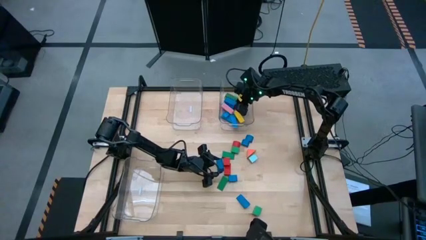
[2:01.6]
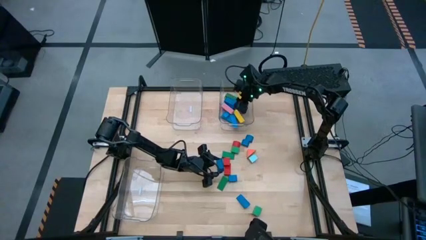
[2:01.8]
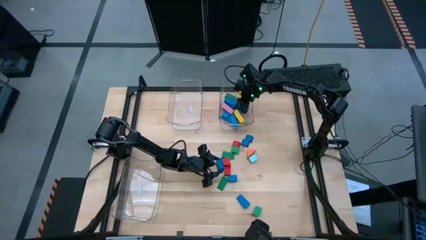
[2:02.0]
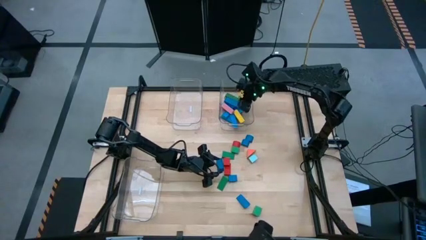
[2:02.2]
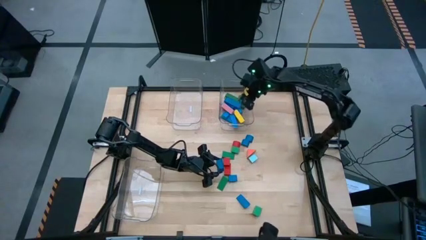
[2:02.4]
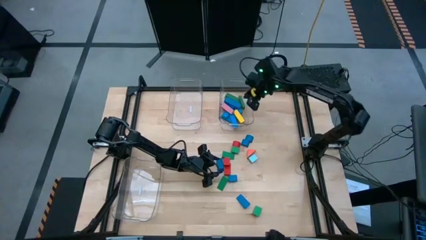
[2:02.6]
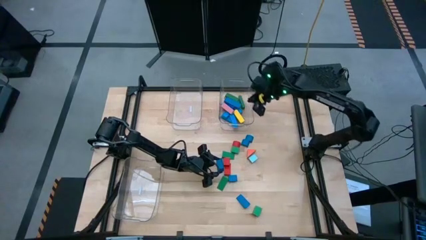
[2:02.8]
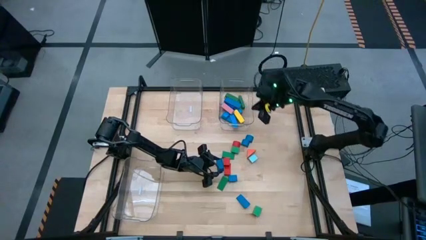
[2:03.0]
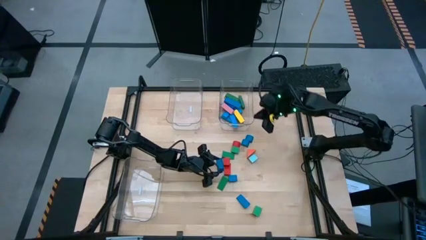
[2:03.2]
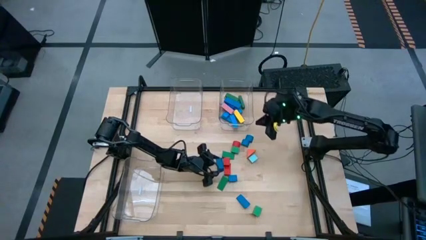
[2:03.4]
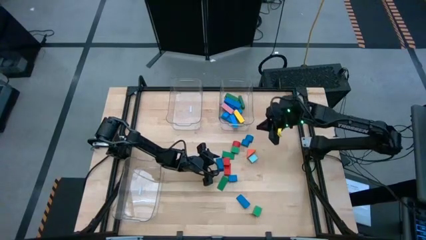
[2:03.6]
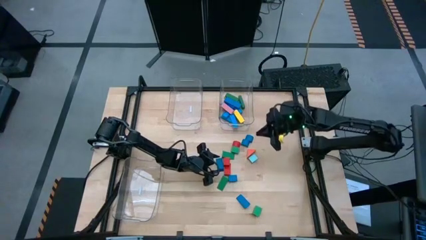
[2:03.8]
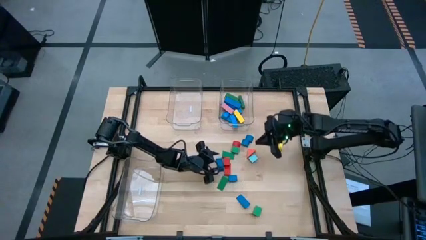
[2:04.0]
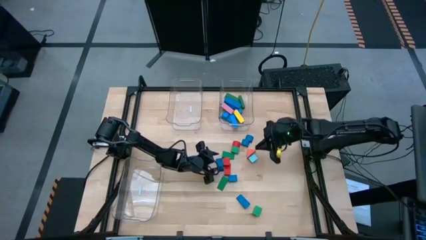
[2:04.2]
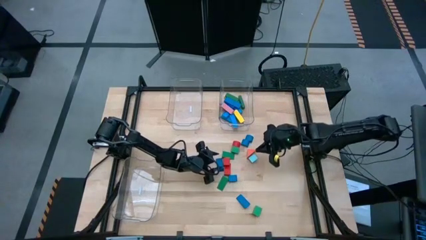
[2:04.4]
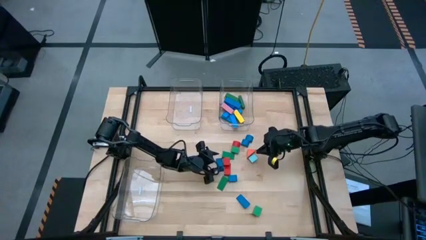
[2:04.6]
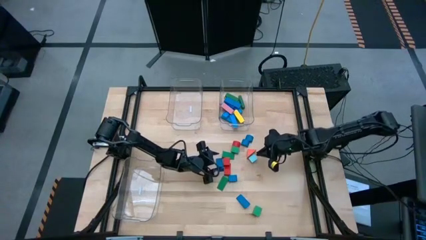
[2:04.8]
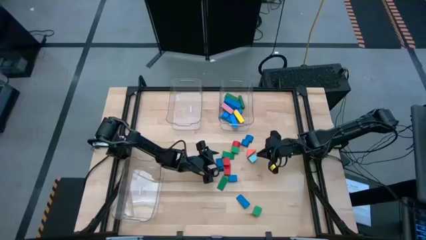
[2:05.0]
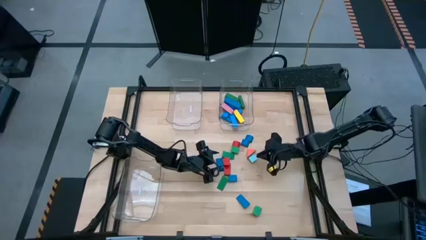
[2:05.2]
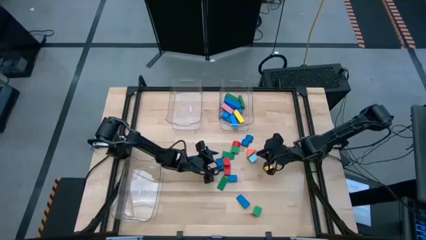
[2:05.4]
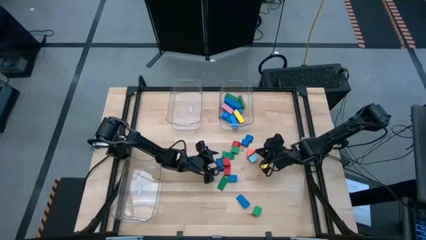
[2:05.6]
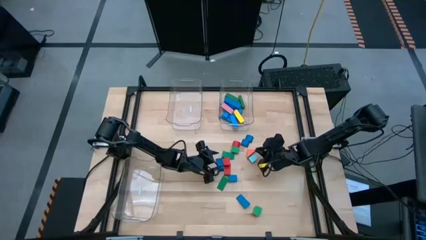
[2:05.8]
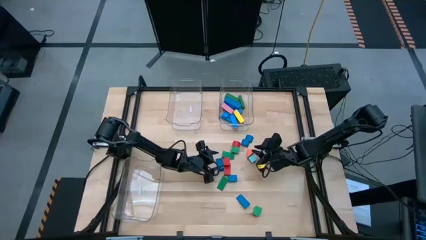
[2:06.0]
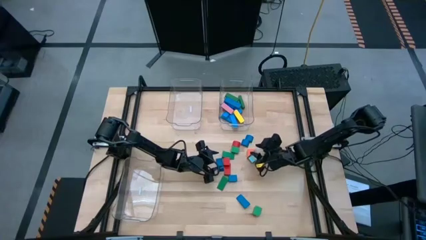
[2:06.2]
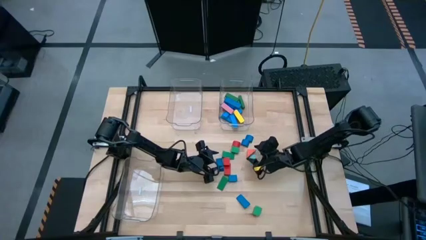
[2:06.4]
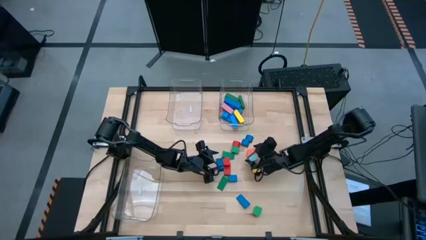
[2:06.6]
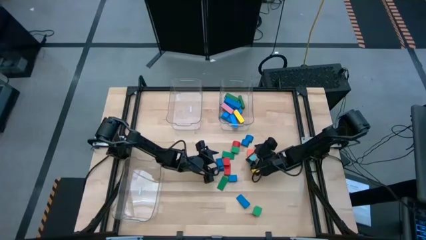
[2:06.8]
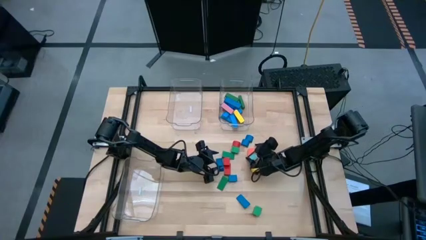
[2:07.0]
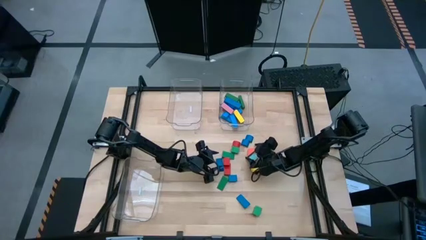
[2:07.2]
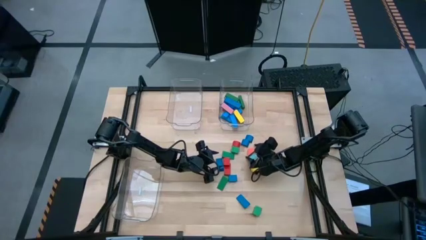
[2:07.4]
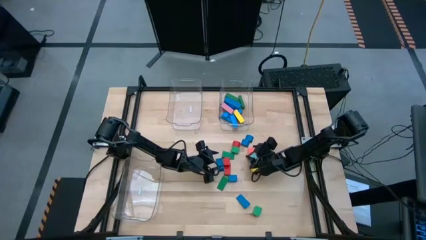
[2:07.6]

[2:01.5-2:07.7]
Task: Sort blocks by size
Put the orange triangular block into the bottom transparent bin

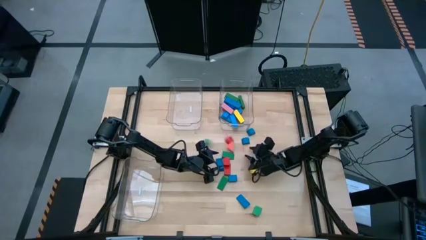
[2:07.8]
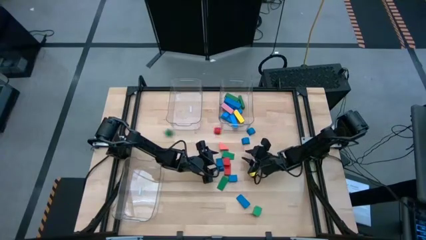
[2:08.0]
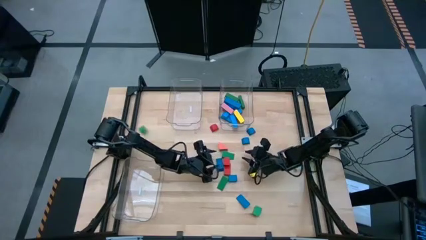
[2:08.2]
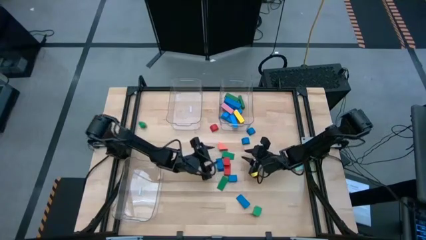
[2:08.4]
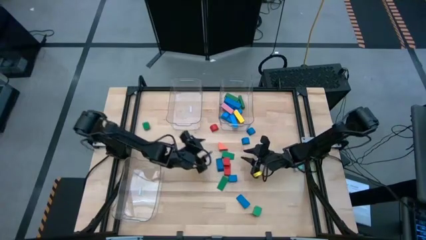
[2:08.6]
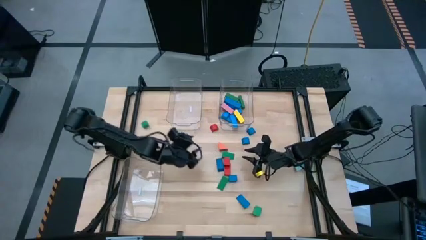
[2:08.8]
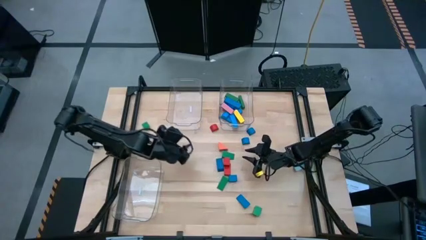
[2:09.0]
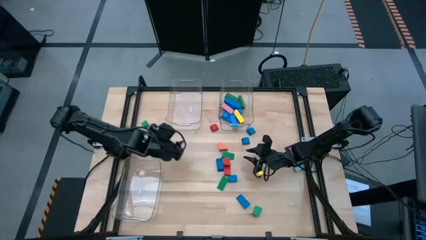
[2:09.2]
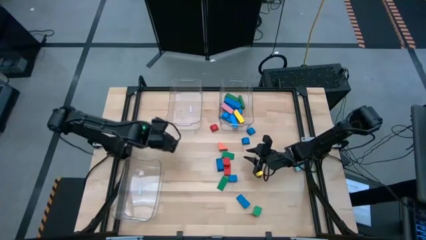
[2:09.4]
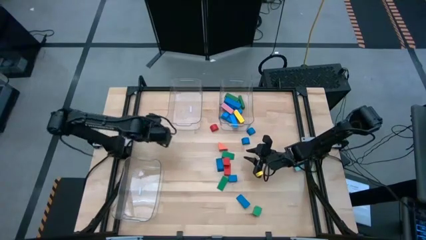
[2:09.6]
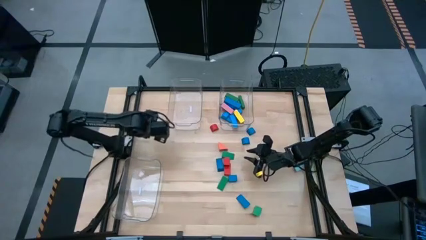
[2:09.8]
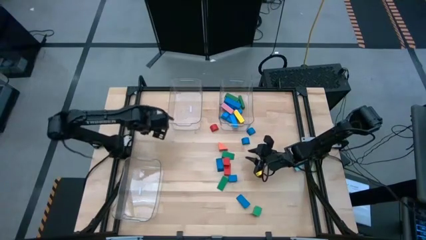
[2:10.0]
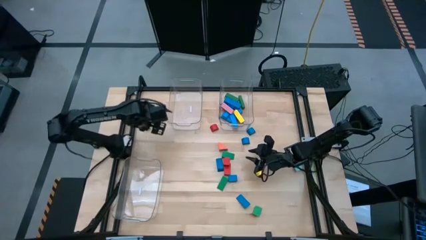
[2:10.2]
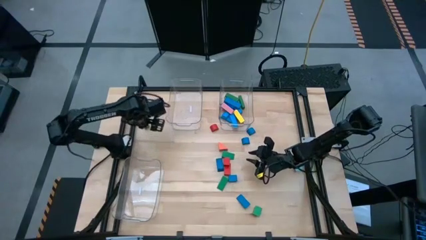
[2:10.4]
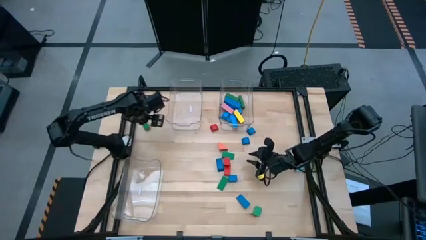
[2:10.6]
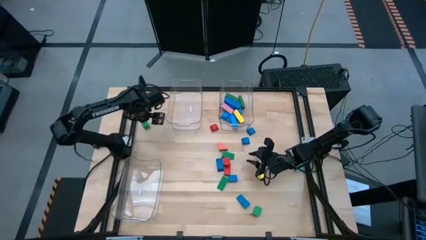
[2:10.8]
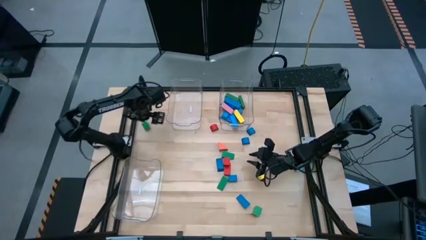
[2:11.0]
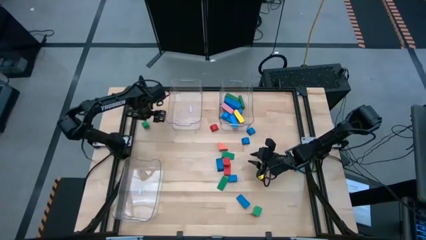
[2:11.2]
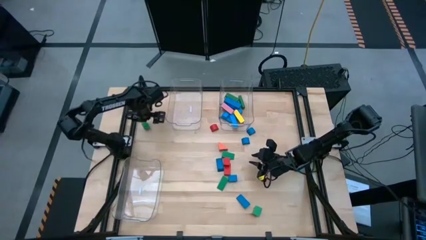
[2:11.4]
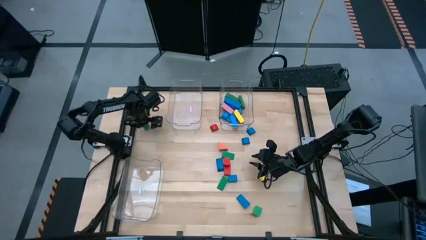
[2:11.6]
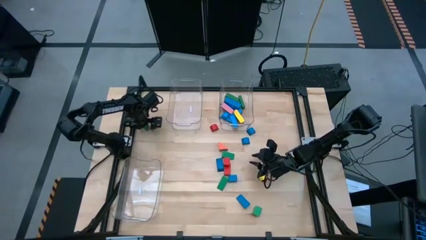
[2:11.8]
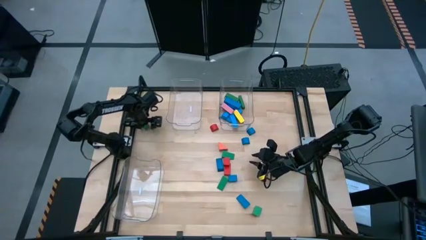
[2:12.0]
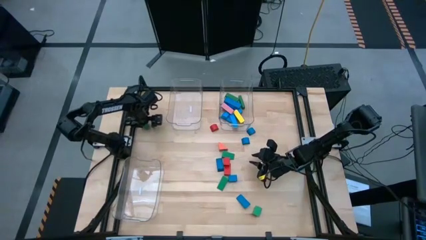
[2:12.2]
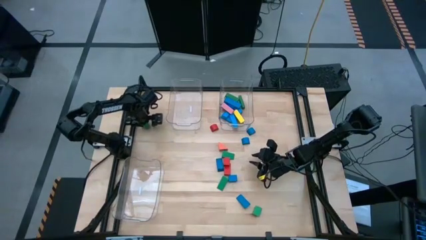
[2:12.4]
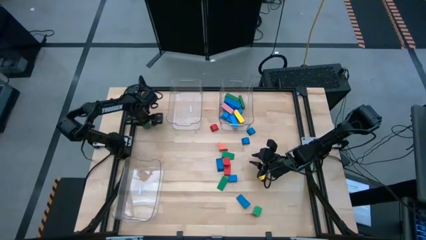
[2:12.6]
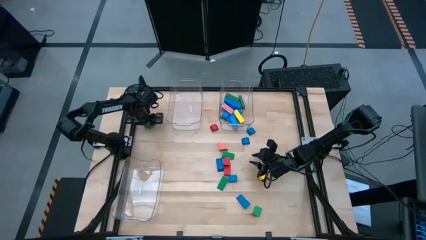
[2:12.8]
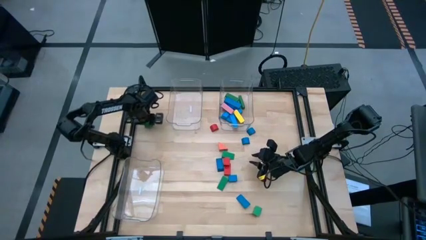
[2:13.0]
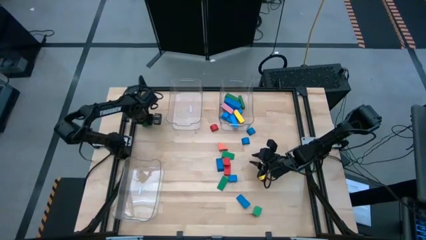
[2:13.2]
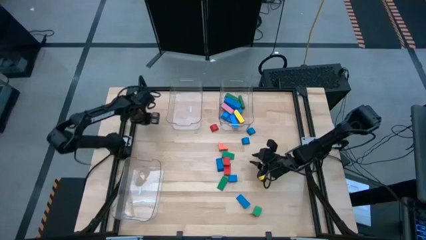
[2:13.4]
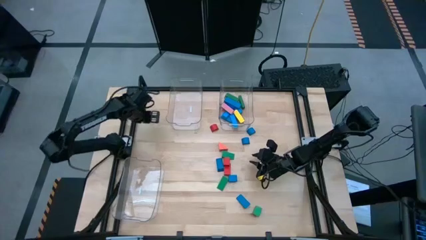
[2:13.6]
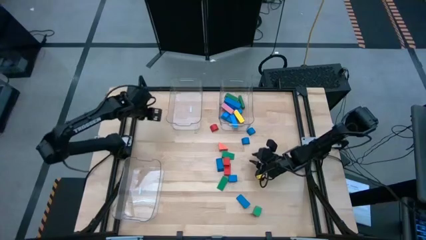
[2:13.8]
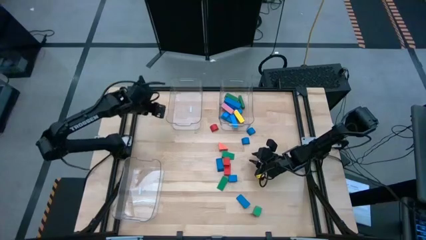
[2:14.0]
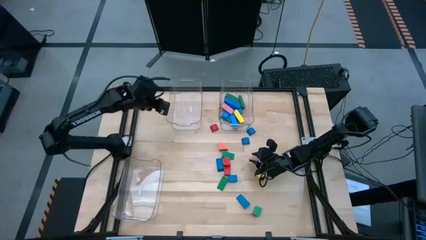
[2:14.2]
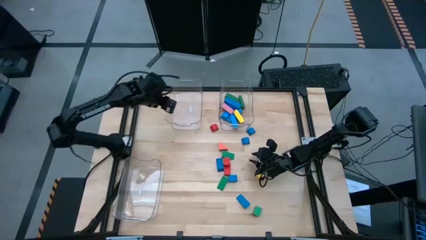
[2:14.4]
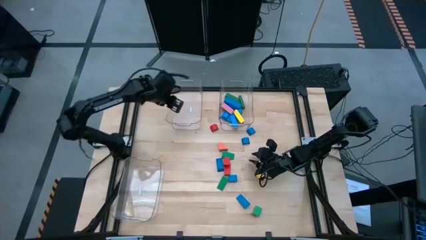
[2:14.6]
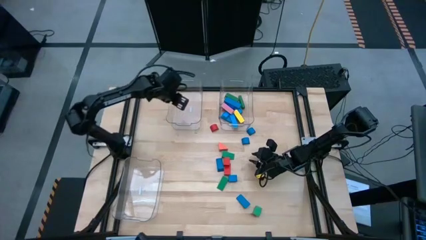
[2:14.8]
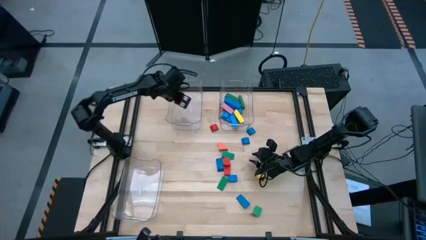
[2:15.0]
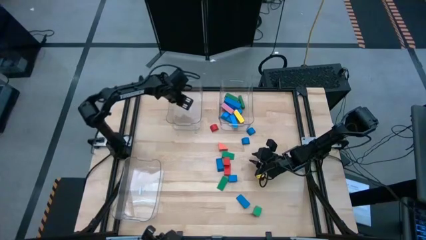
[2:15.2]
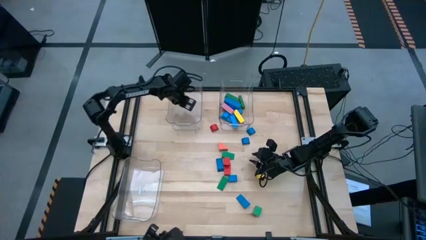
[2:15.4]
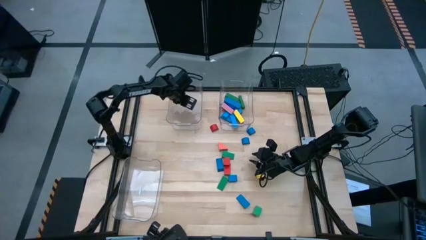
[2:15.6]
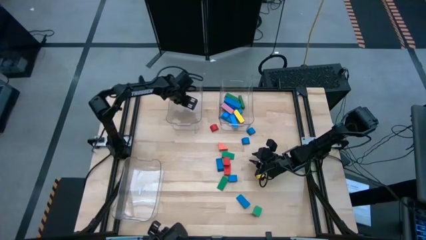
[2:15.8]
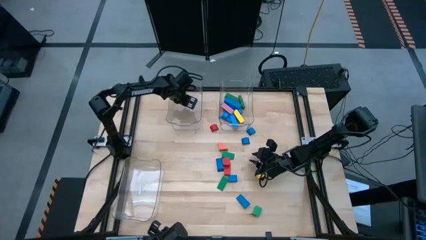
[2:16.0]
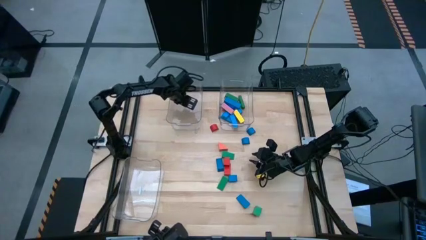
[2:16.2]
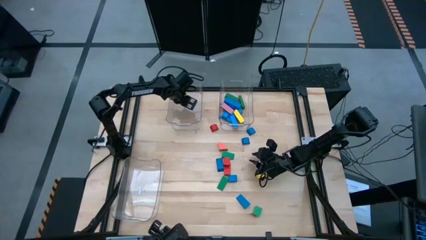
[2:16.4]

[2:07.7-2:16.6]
Put the green half cylinder block into the top left transparent bin

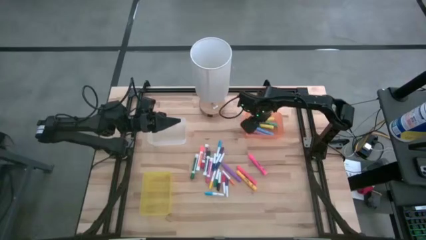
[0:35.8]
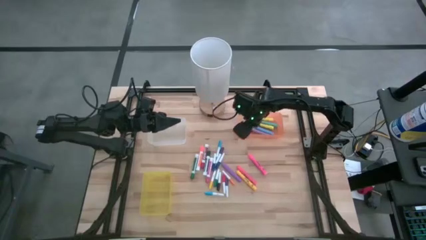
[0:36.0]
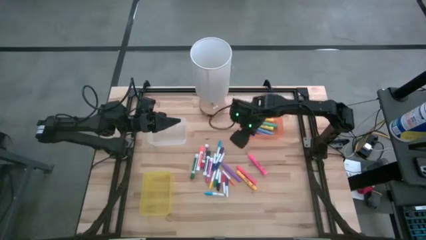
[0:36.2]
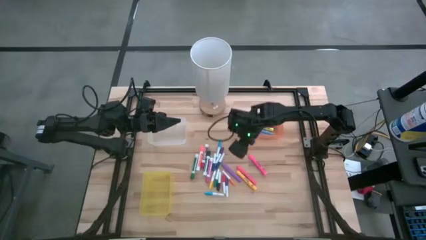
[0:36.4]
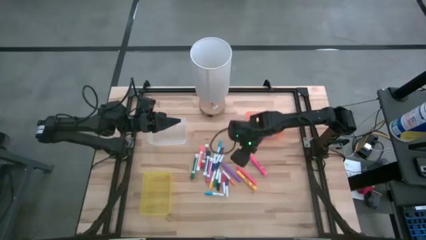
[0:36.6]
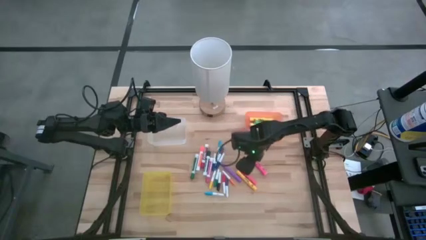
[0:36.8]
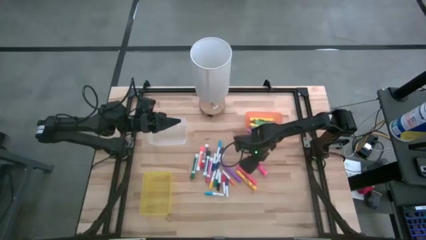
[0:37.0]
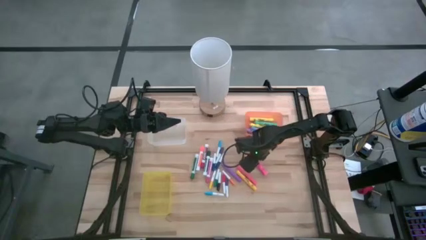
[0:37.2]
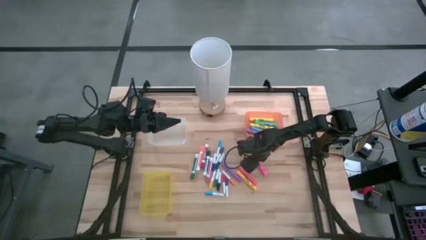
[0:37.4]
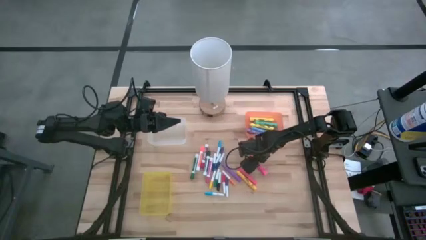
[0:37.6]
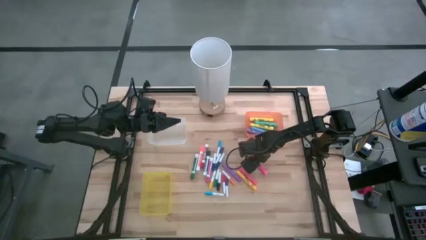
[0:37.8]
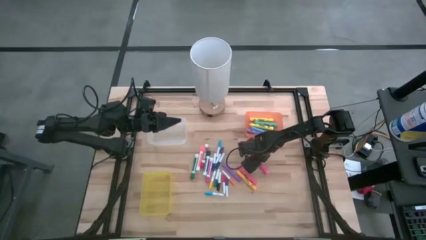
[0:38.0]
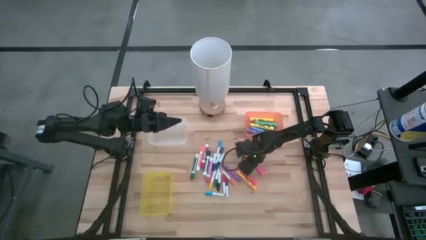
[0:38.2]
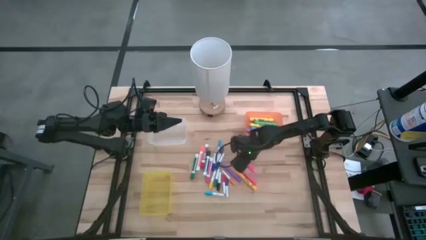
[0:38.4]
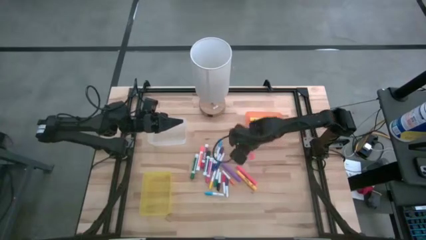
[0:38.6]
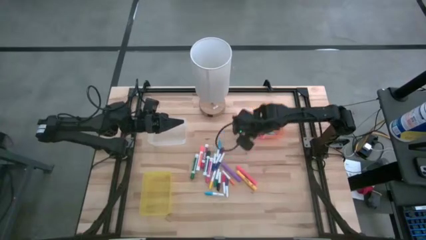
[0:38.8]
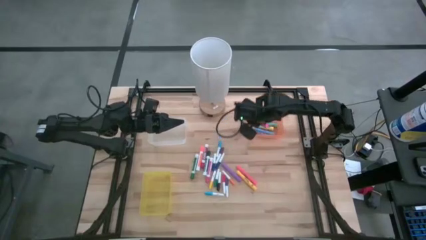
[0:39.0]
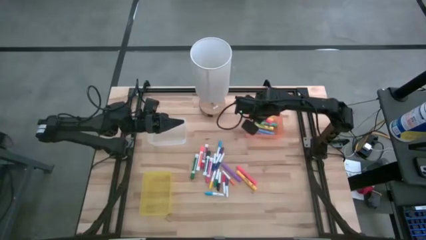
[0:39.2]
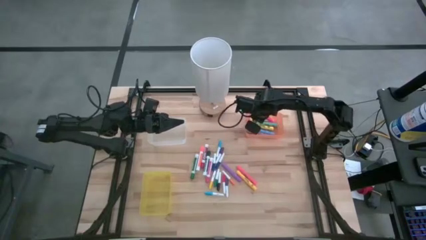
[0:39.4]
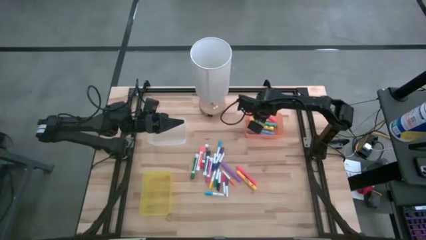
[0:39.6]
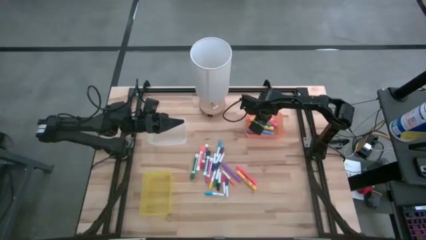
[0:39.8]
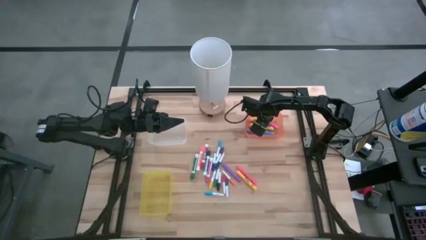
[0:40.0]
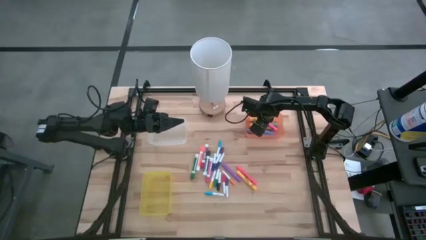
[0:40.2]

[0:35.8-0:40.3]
Task: Pick & Place Markers
Put the right pink highlighter pen into the orange bin
